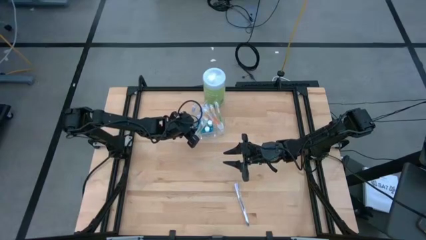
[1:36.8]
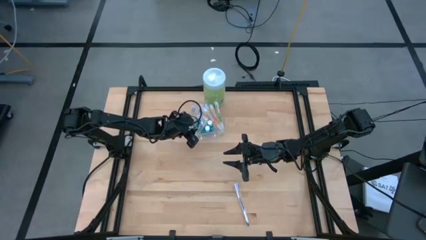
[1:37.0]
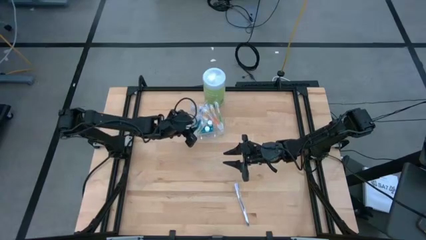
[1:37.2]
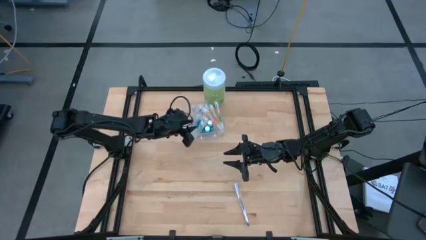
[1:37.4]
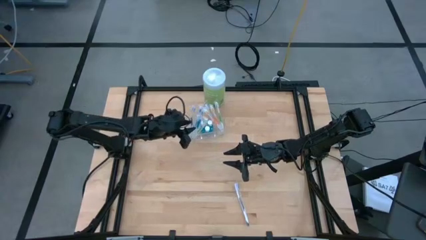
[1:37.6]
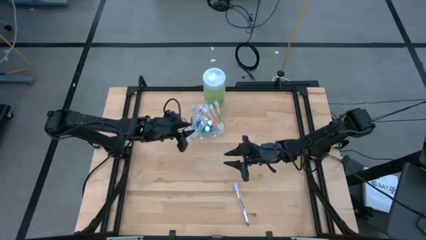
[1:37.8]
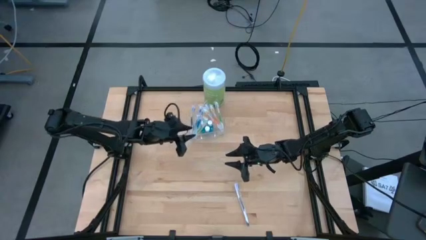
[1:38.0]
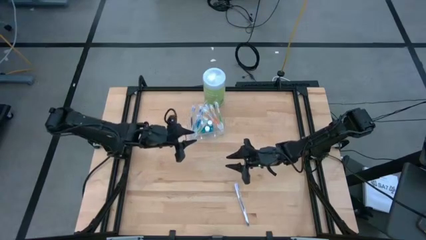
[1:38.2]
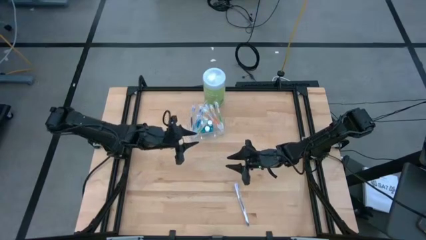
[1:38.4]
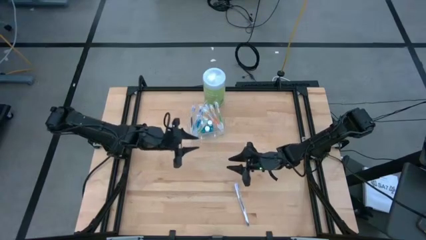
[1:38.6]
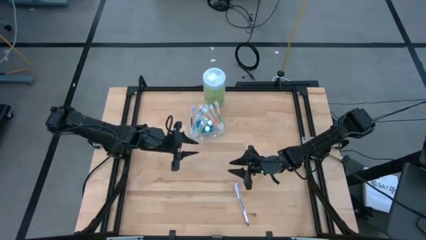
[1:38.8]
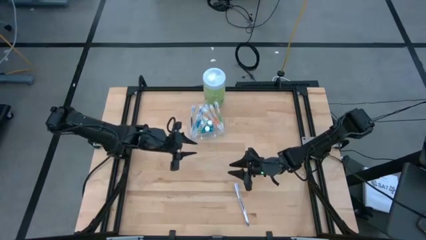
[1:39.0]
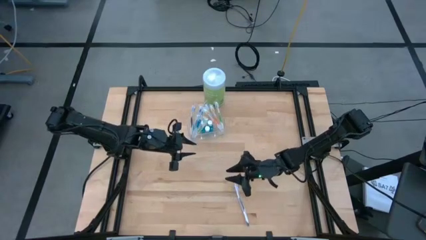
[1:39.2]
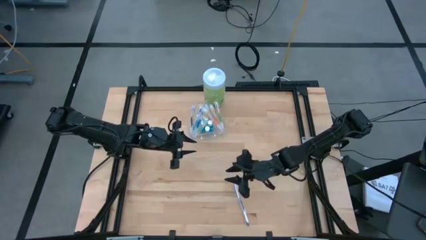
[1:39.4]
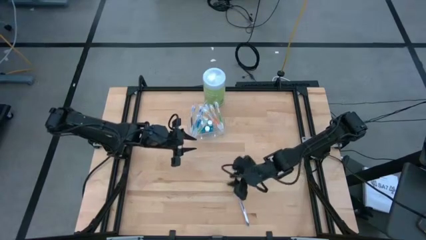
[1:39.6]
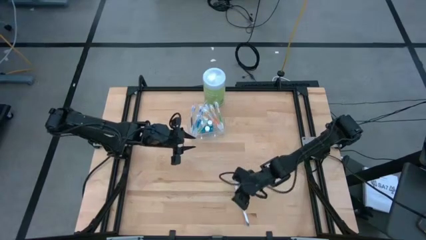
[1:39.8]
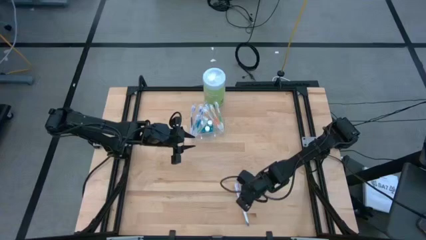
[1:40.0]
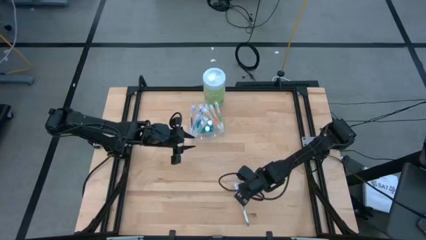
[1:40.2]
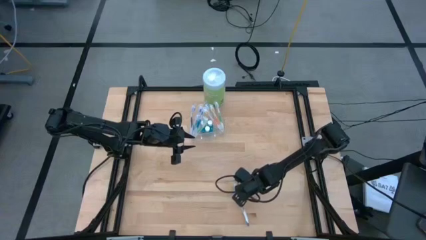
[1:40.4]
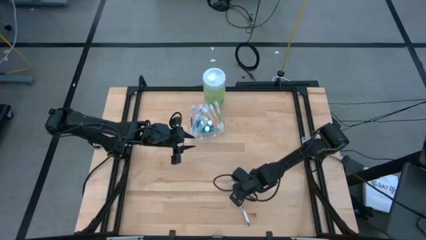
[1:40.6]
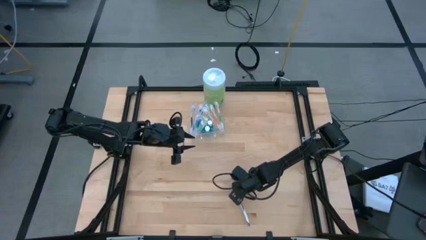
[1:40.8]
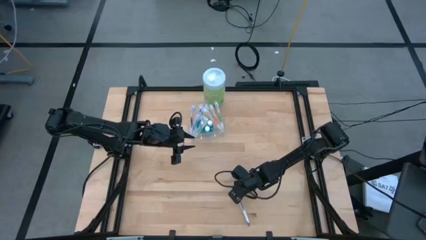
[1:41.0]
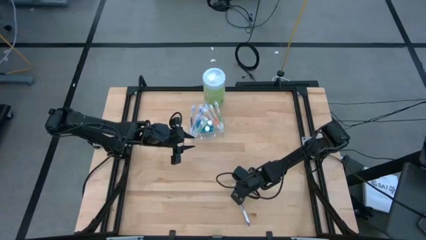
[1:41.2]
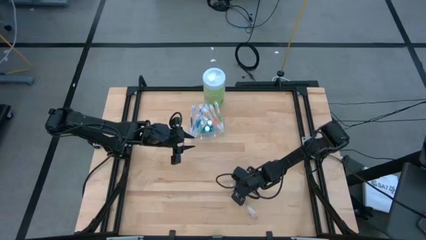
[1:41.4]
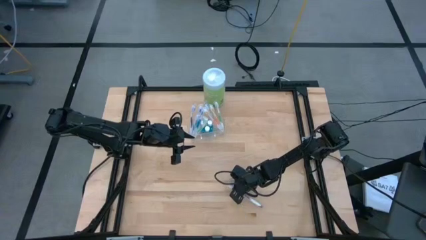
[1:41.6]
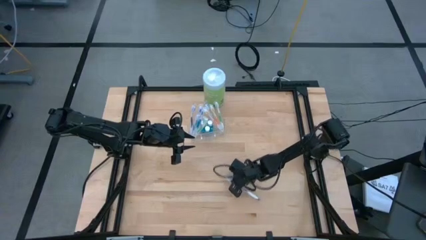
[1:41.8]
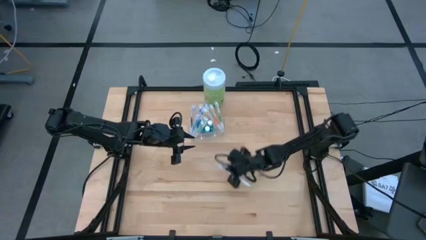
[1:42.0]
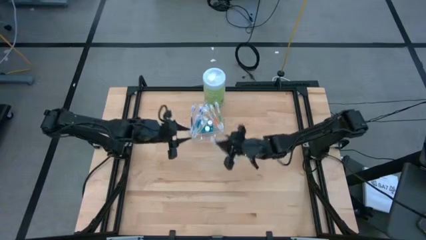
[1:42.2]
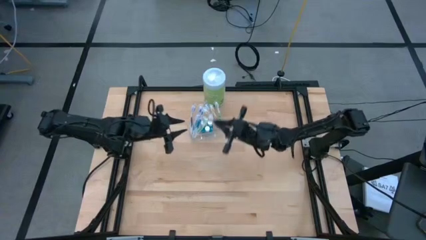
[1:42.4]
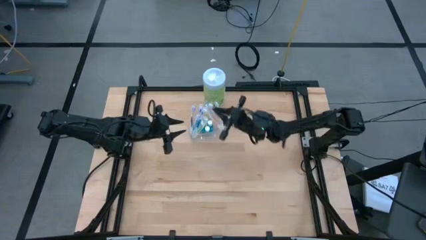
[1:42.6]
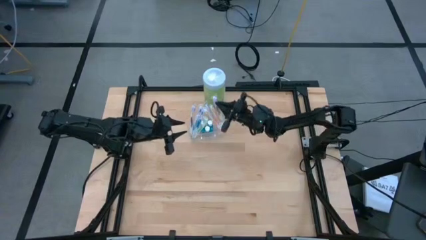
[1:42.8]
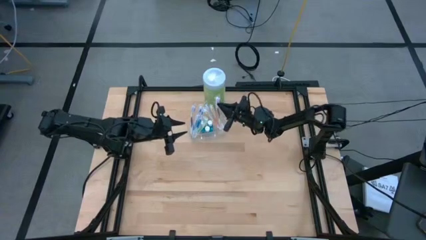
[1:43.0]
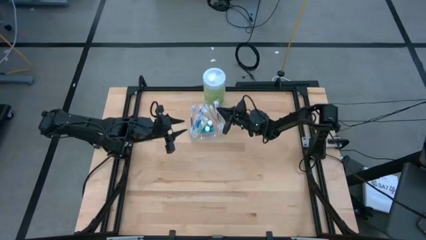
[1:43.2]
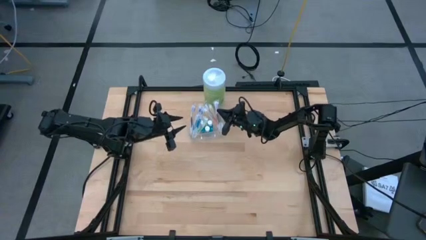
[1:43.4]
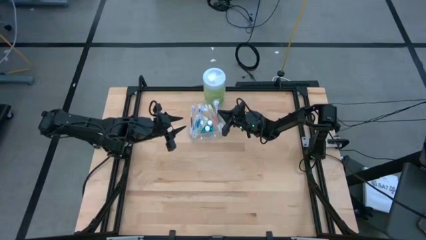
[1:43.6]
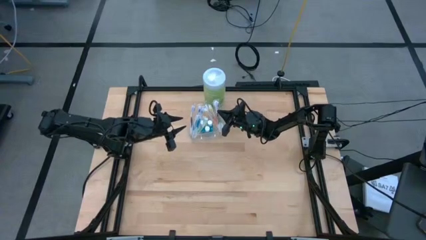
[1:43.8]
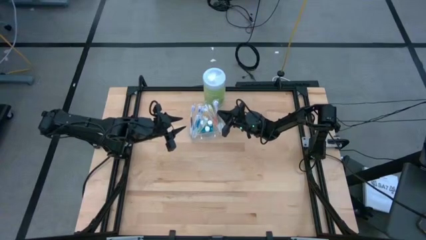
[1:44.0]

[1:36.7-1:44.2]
Task: Pick & Place toothbrushing station
Put the purple toothbrush into the transparent organizer

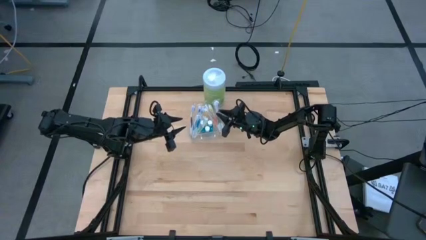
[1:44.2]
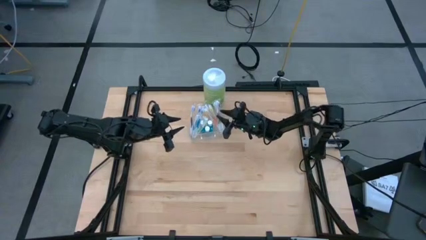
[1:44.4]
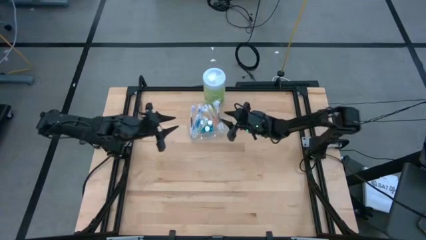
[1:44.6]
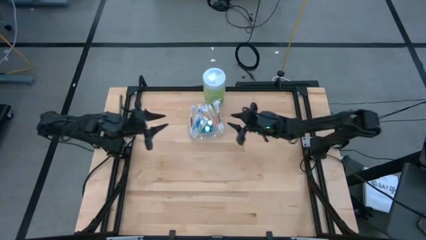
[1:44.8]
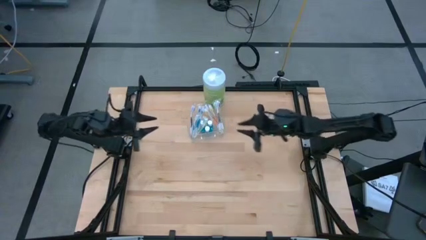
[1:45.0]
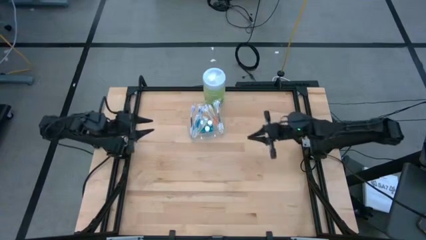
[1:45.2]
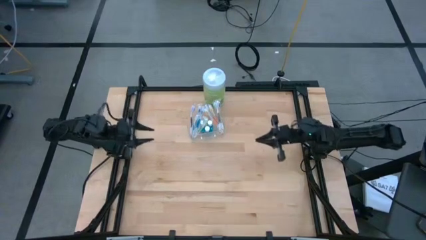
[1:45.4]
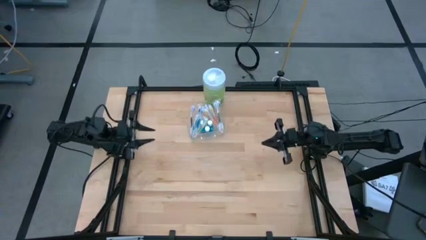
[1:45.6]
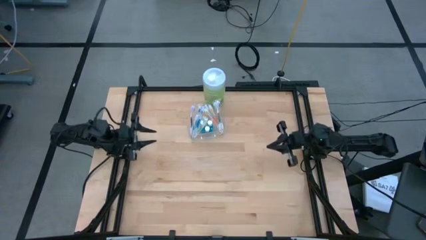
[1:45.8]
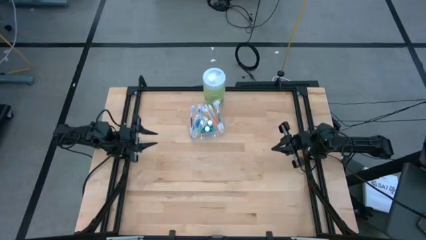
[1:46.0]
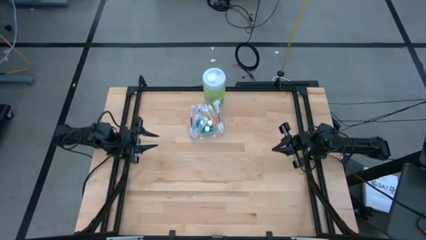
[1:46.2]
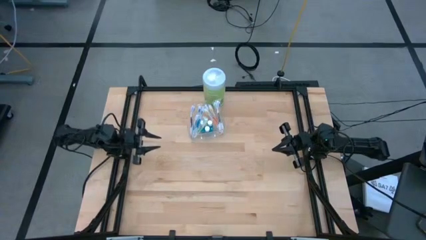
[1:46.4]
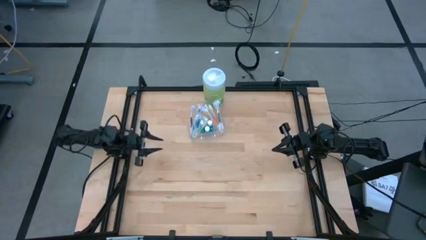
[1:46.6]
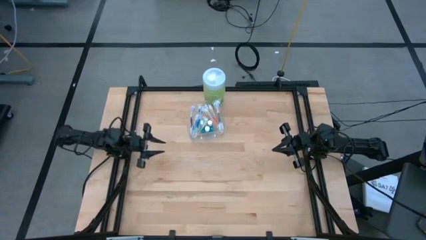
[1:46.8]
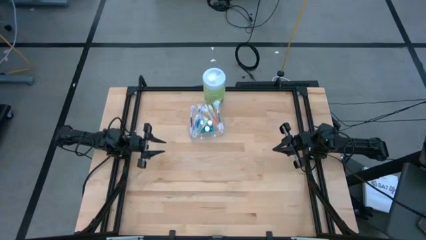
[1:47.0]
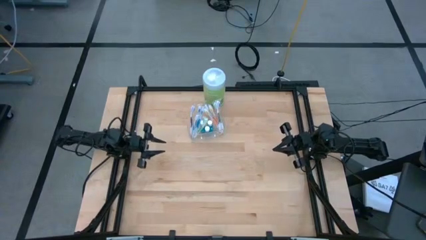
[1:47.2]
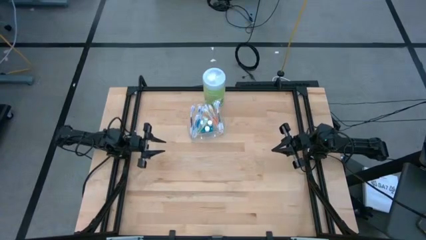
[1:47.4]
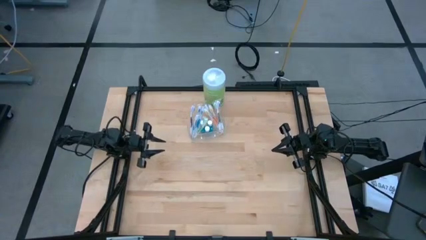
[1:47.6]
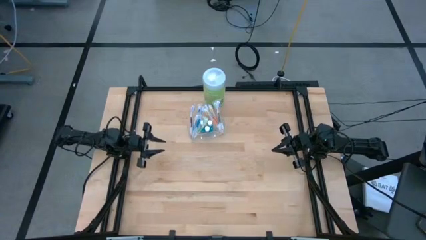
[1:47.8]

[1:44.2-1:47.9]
Return to Home Position

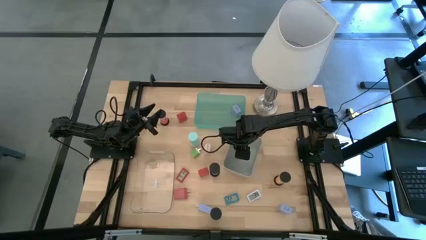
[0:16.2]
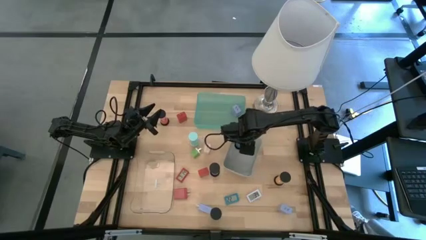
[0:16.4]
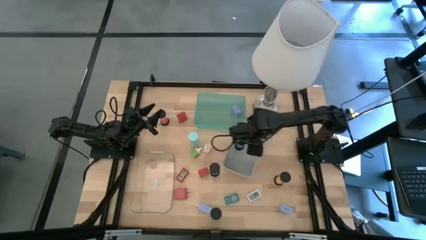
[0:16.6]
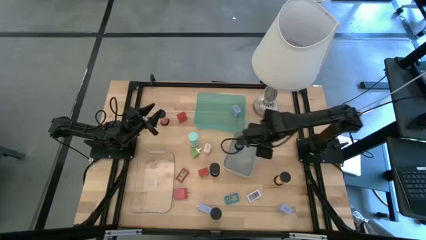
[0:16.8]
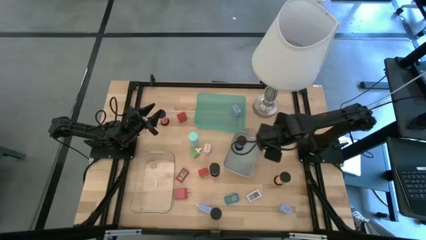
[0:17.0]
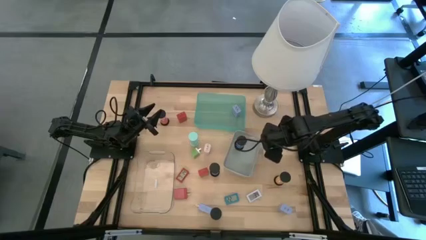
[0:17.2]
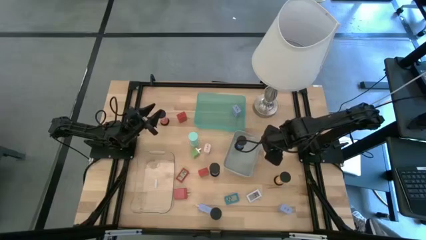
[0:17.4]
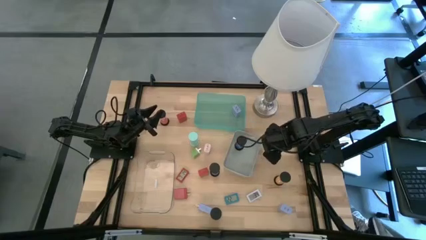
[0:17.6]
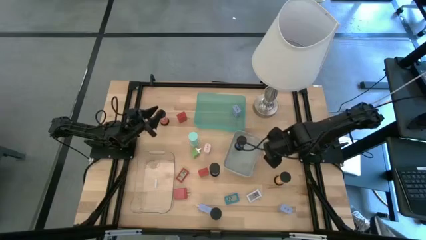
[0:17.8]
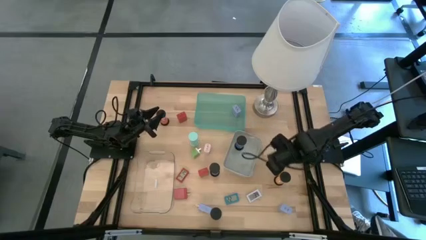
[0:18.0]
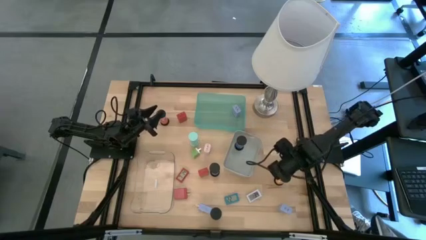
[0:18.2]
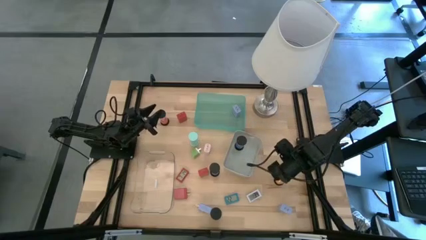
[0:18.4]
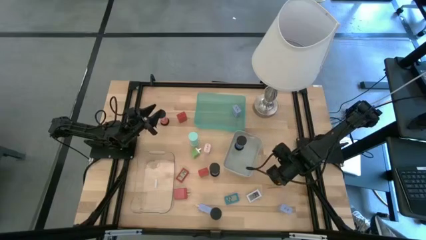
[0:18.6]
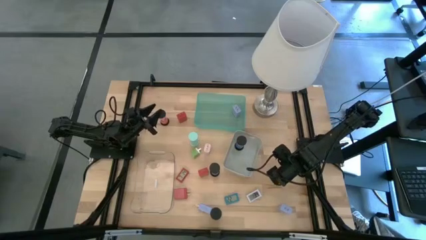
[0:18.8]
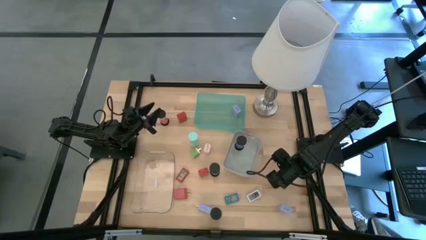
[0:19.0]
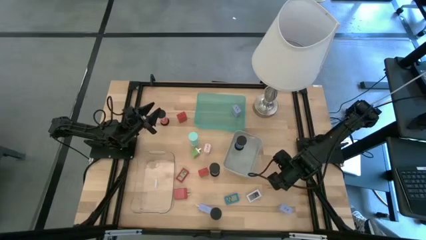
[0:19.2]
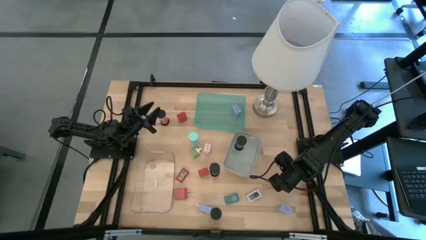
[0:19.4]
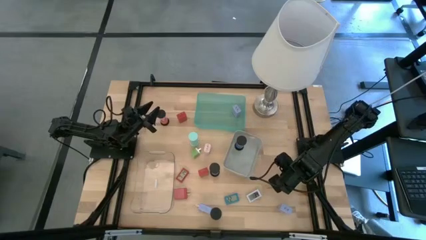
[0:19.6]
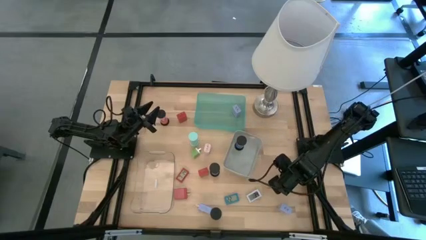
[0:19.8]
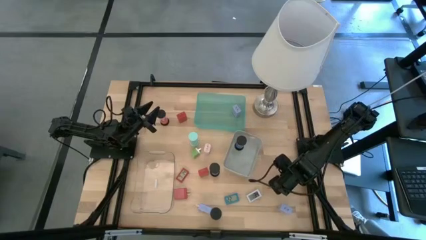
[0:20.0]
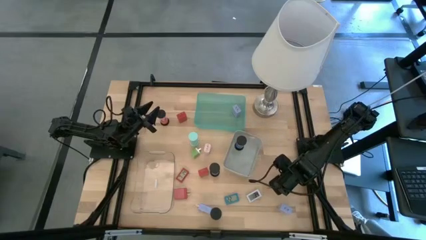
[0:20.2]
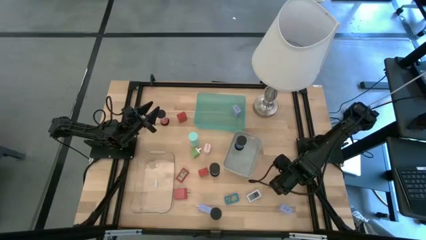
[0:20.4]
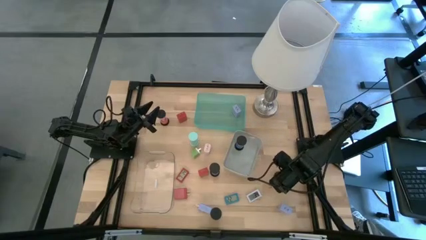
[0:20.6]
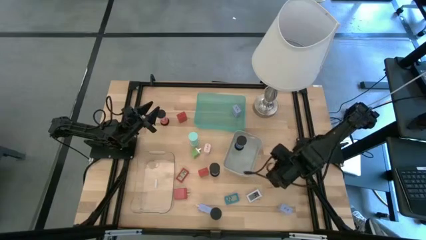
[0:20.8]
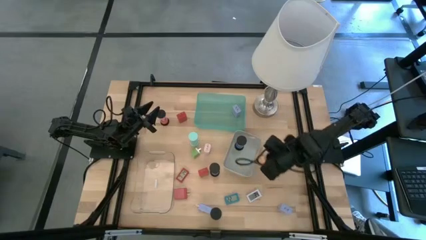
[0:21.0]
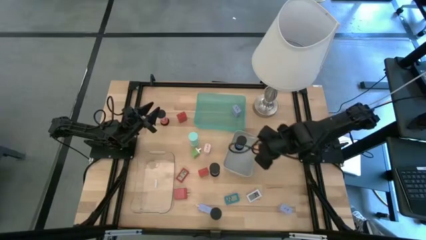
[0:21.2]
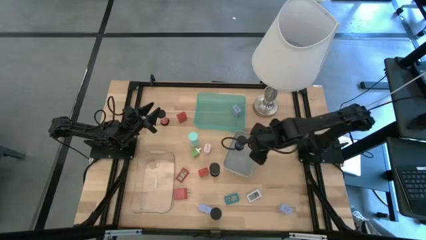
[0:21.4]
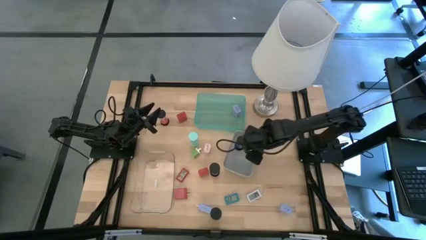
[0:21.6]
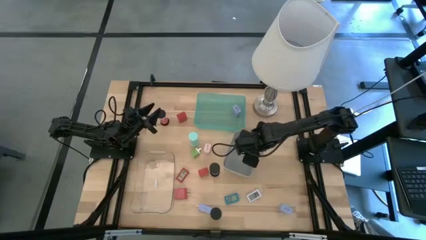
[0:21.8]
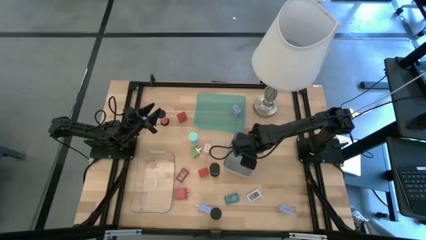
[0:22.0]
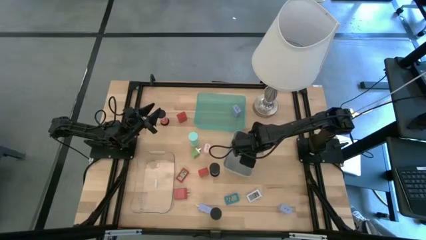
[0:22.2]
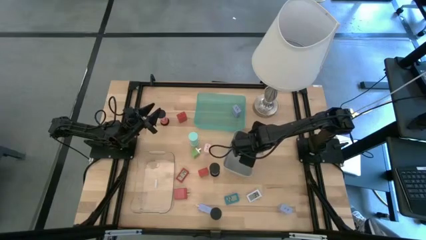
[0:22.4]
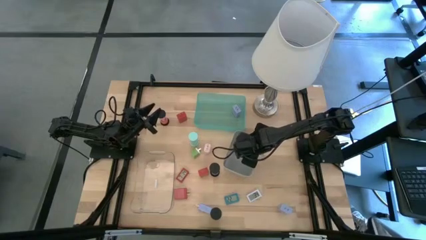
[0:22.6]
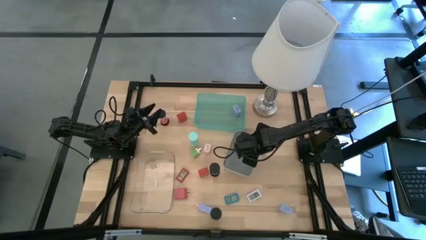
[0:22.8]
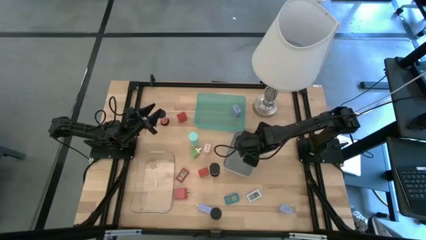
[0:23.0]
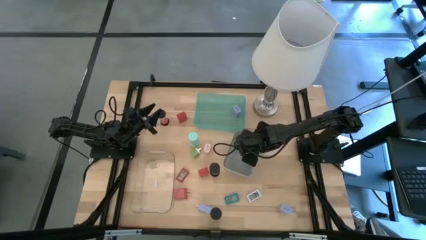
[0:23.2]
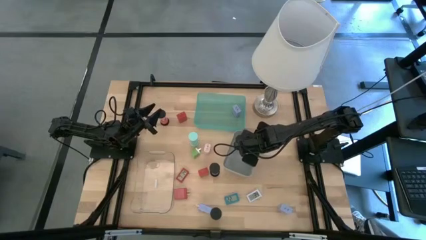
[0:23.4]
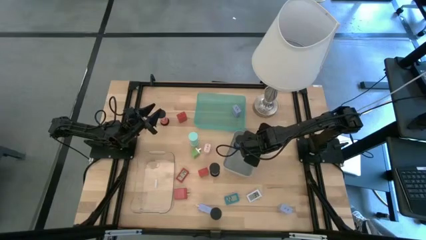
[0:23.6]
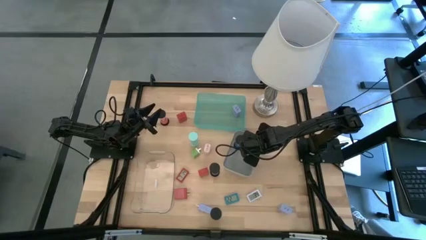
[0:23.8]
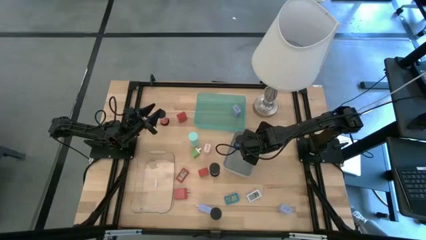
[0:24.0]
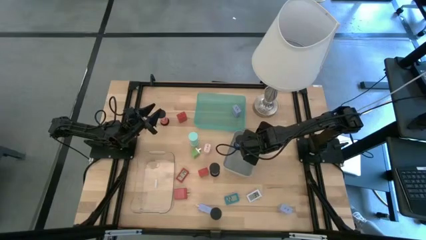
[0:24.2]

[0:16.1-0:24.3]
Task: Pick & Place Office items
Put the orange hourglass into the gray bin
